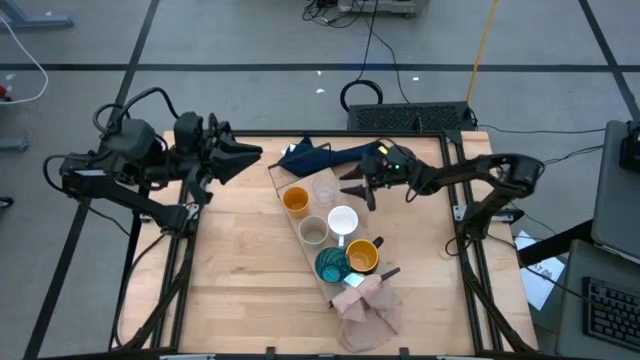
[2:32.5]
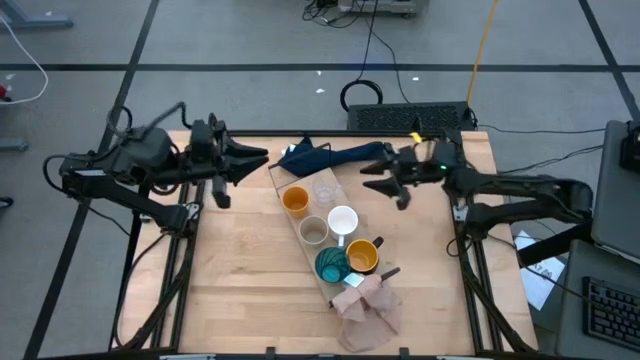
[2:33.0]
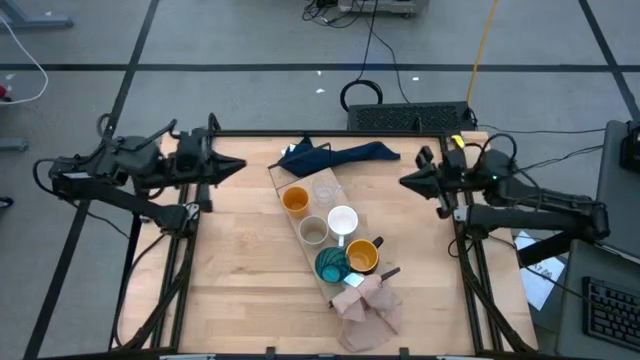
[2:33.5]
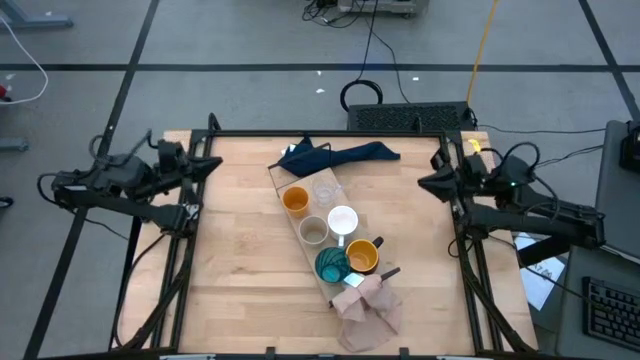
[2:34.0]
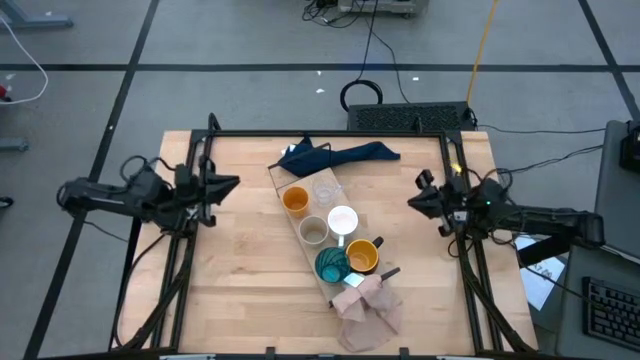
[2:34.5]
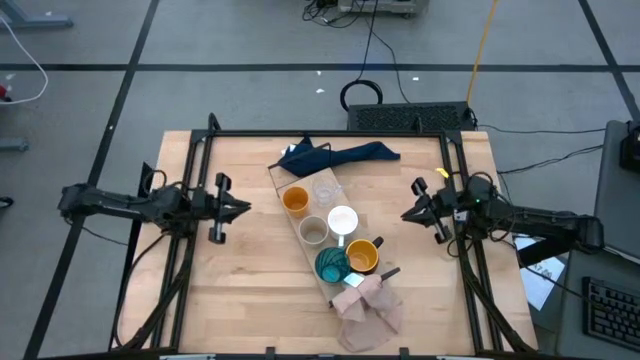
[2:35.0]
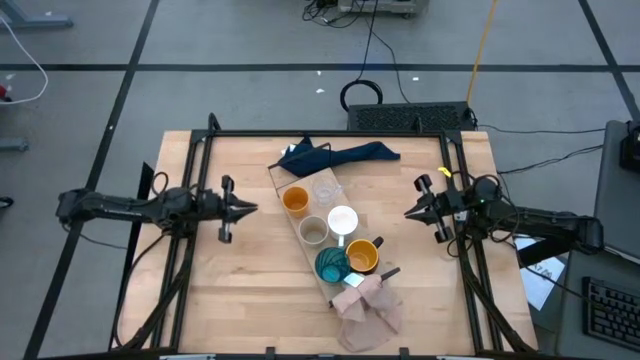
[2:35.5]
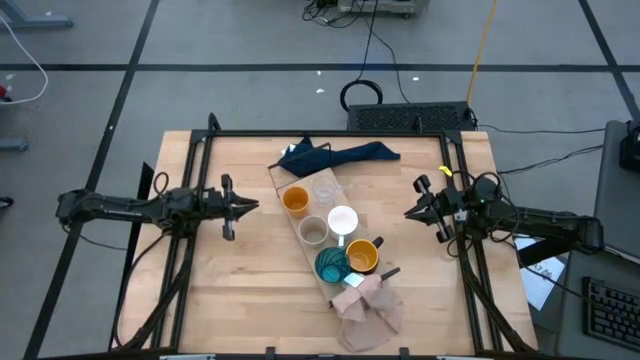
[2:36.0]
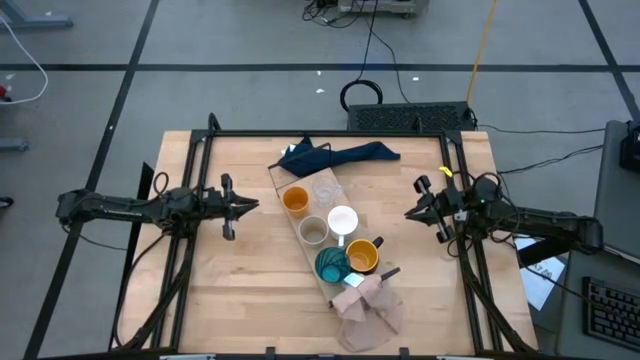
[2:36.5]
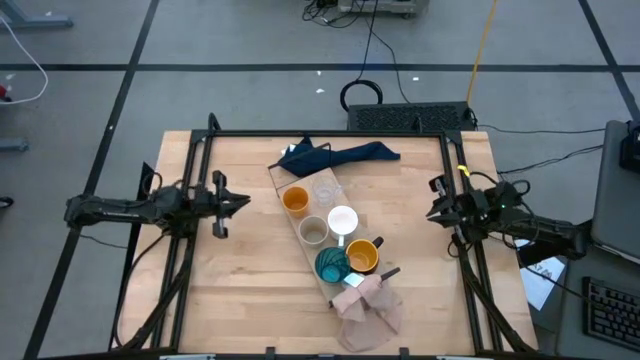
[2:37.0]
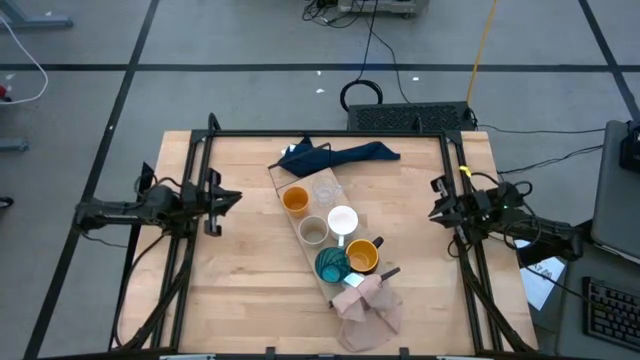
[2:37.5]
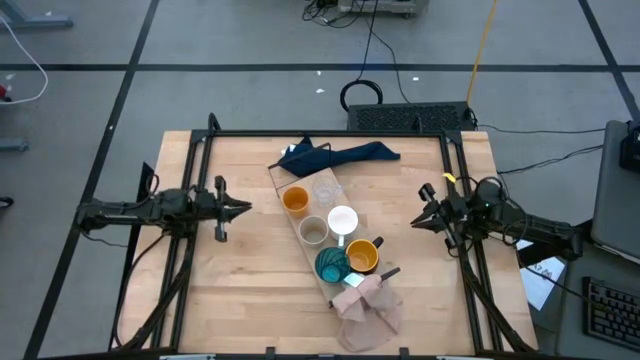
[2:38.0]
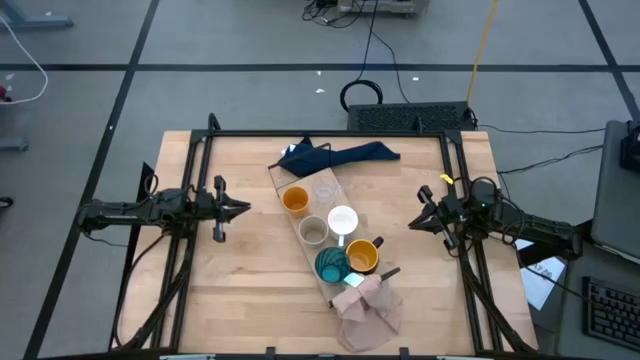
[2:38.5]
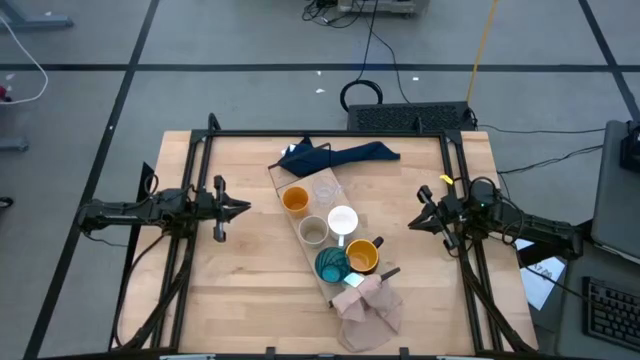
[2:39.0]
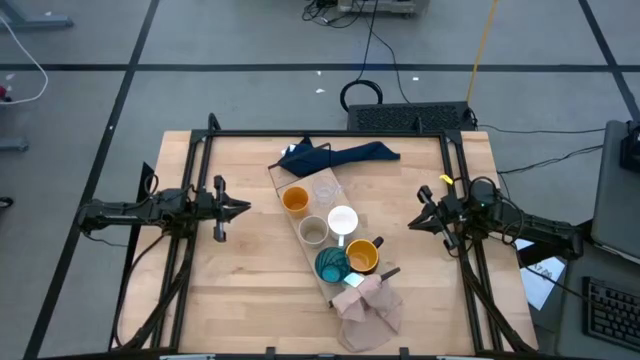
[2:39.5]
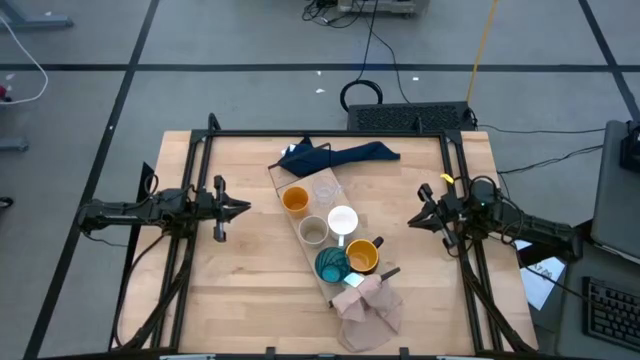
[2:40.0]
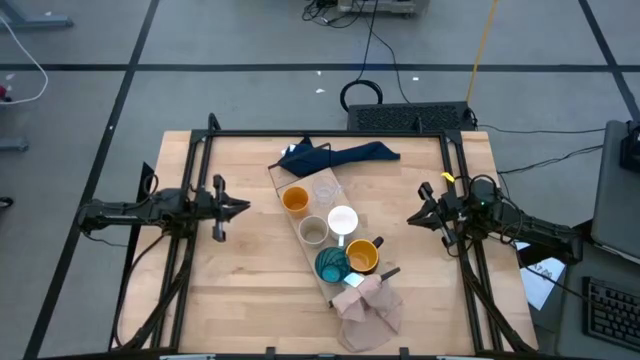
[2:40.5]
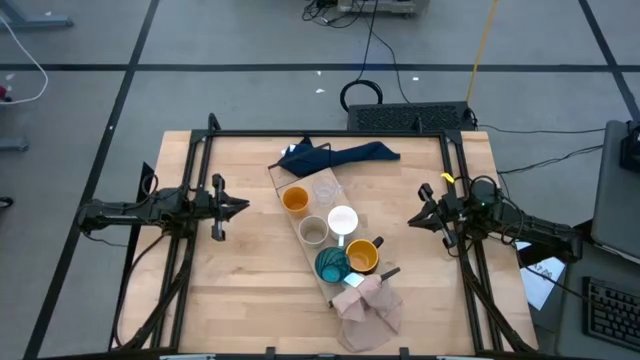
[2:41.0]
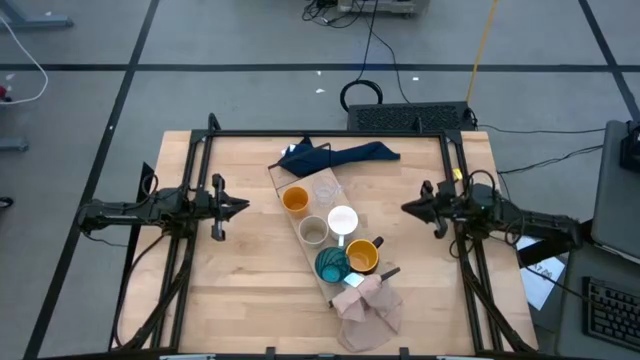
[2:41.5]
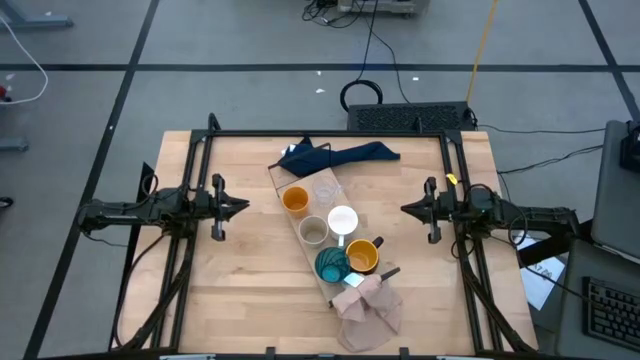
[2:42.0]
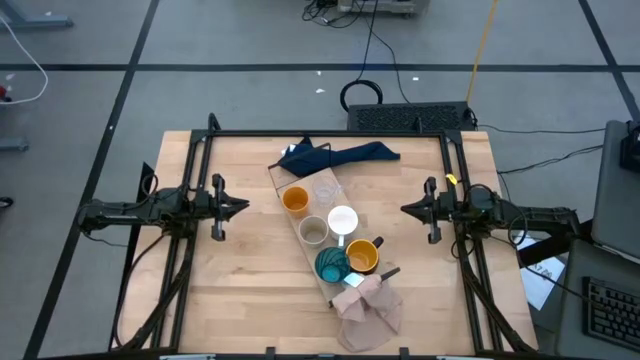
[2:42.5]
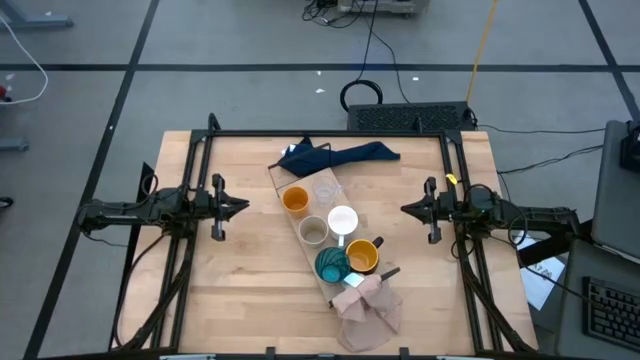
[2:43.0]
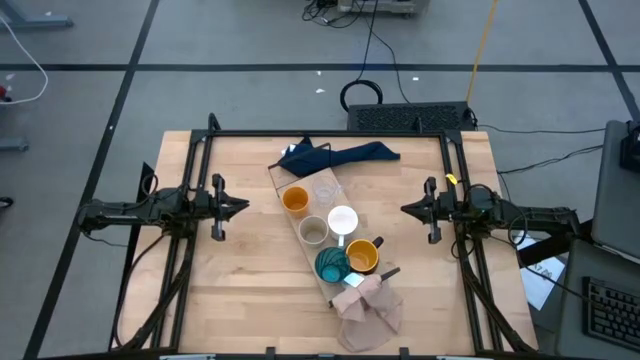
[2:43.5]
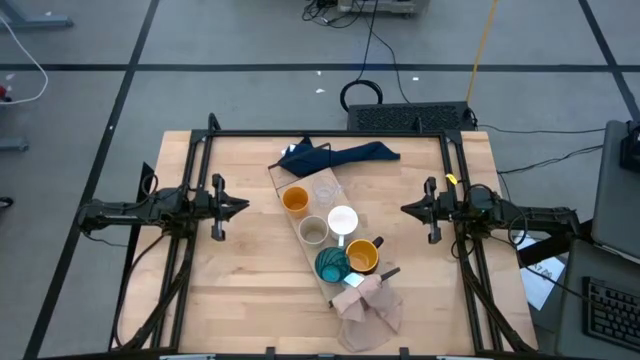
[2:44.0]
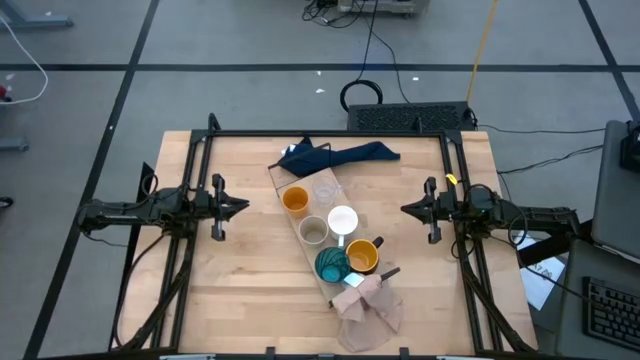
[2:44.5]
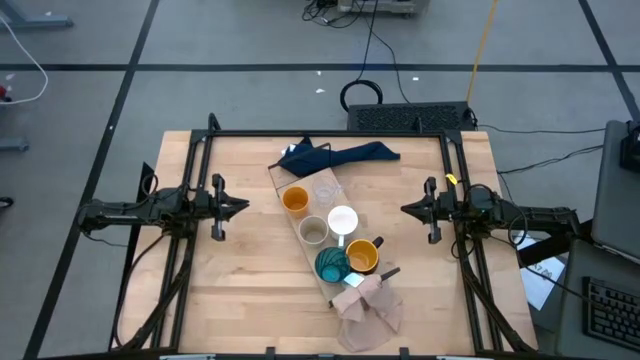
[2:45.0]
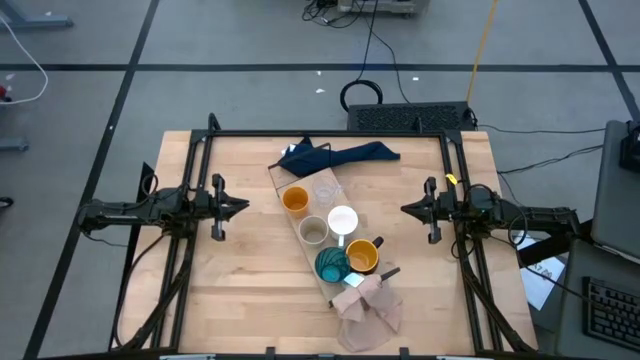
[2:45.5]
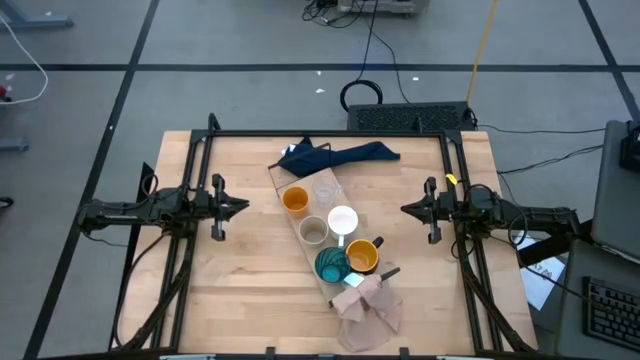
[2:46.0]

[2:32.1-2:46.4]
Task: Stack small to large cups/mugs on shelf
Return to Home Position
